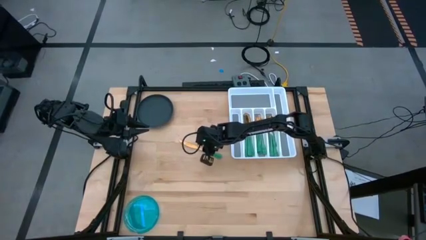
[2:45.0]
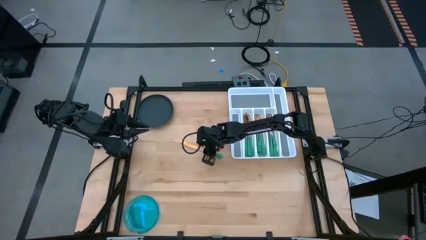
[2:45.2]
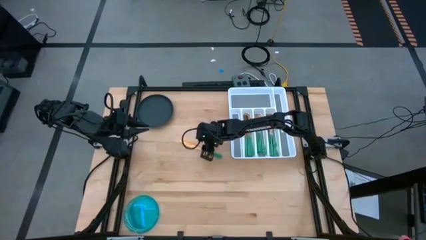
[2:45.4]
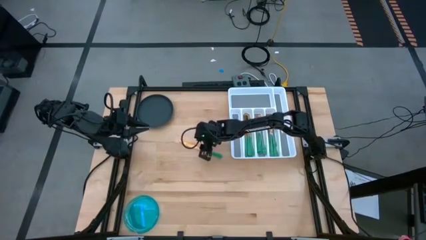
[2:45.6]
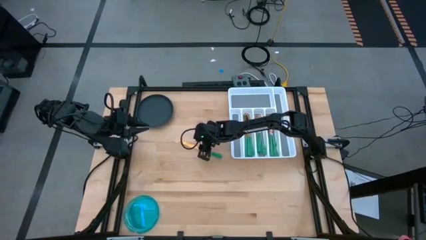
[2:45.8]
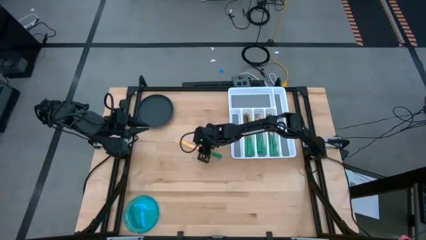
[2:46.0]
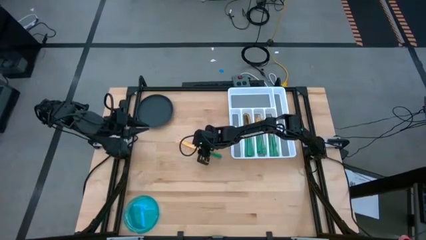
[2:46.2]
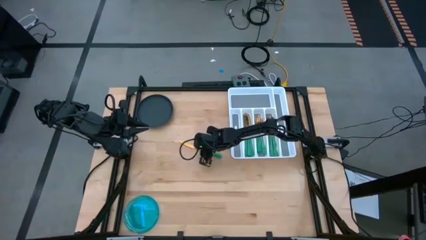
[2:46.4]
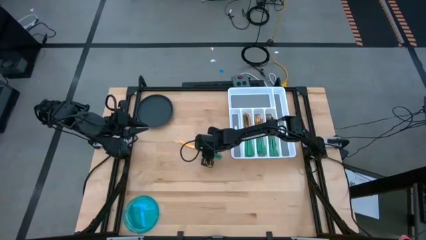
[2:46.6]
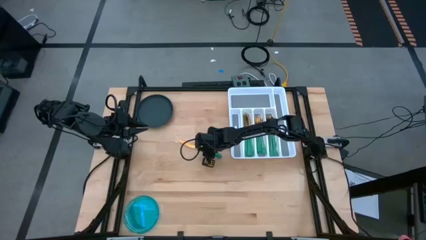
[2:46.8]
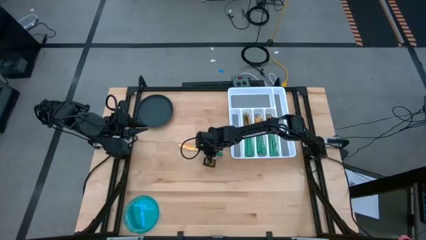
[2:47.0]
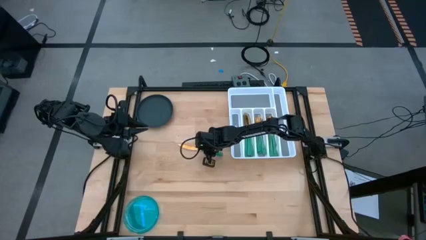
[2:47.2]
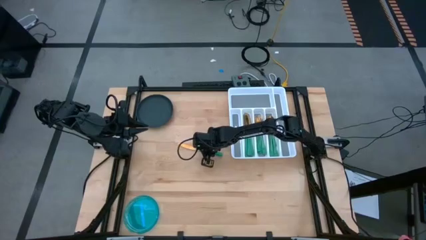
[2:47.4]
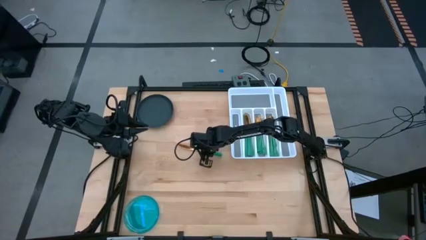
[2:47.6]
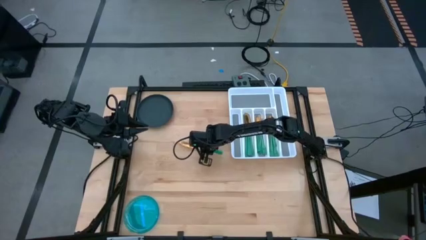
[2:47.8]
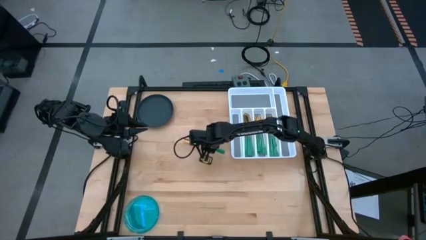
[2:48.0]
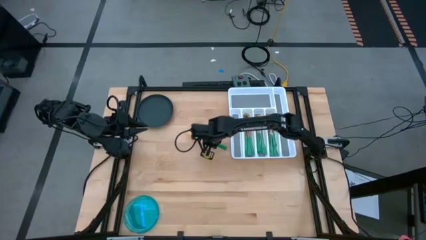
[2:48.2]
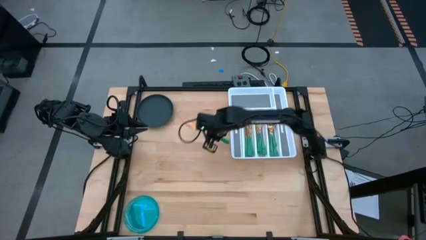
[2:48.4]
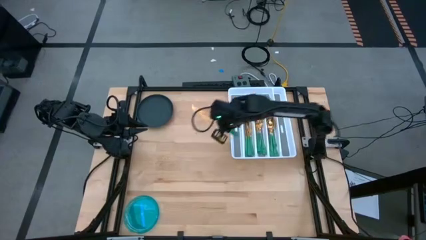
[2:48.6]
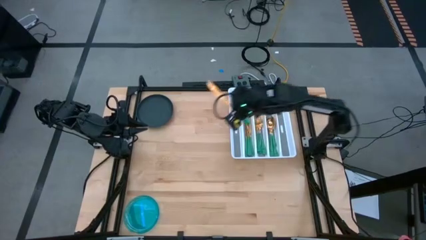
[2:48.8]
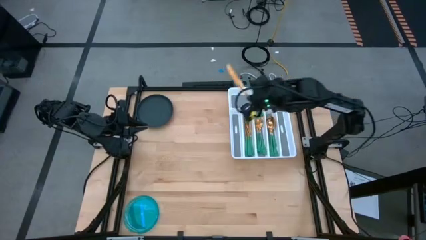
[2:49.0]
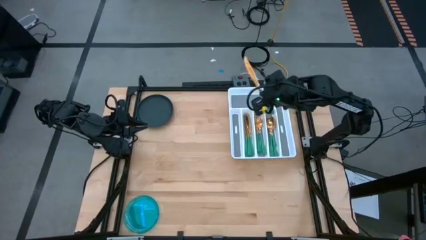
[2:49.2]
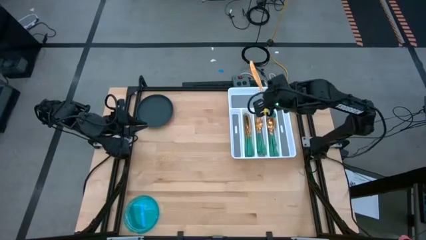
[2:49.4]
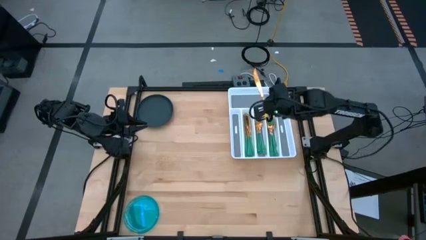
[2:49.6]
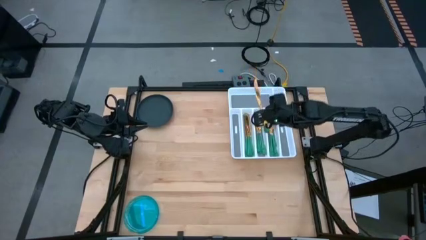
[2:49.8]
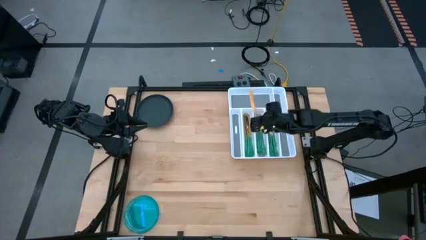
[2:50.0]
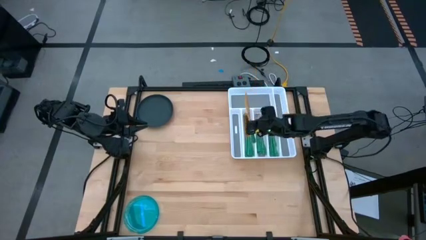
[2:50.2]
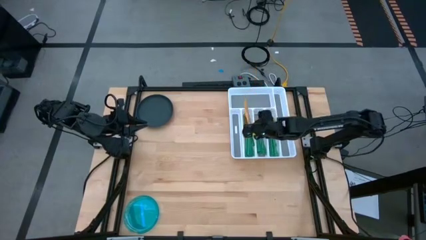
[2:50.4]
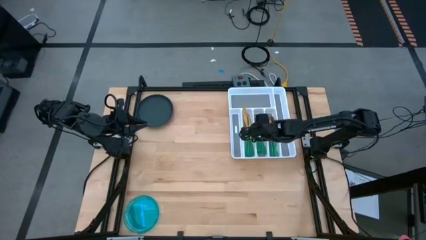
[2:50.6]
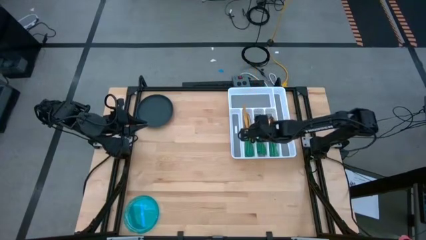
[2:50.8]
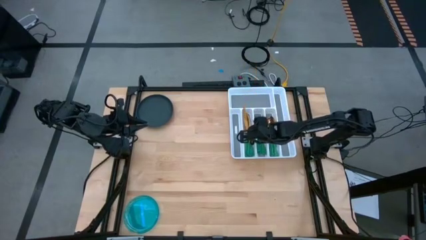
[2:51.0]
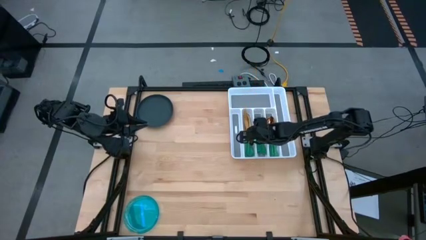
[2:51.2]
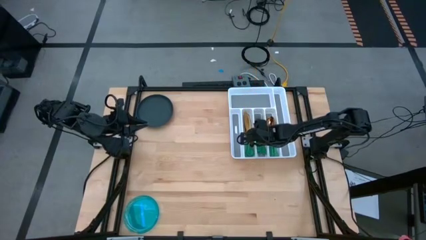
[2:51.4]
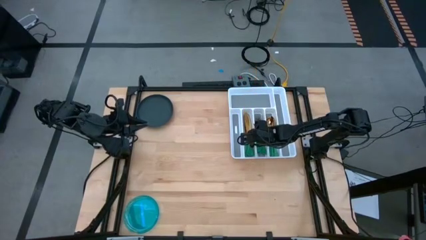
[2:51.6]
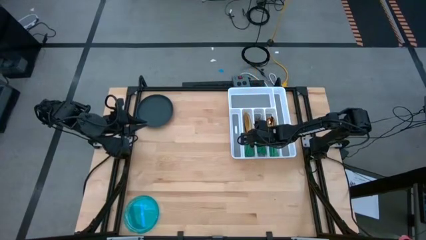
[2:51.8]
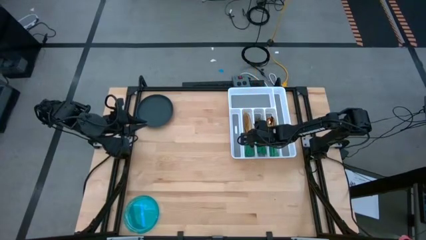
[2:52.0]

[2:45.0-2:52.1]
Task: Sort silverware
Put the green knife into the white silverware organizer

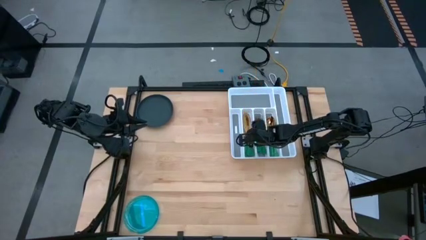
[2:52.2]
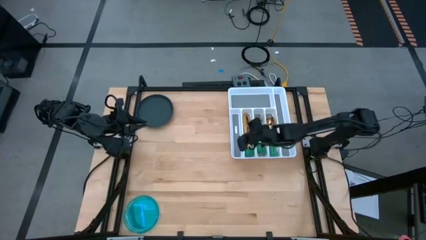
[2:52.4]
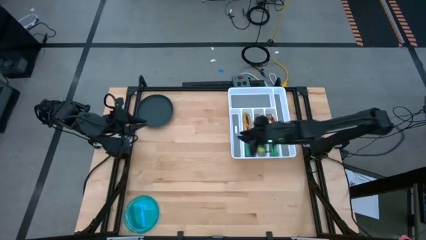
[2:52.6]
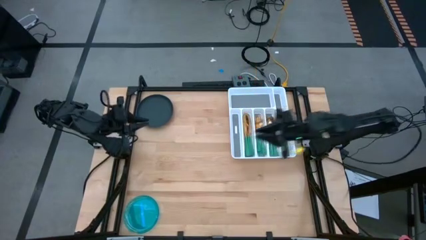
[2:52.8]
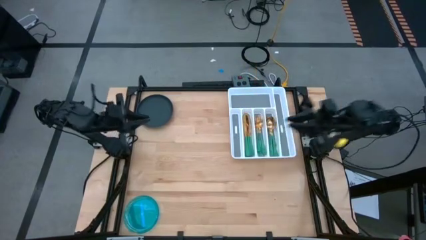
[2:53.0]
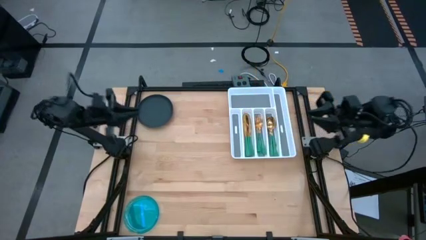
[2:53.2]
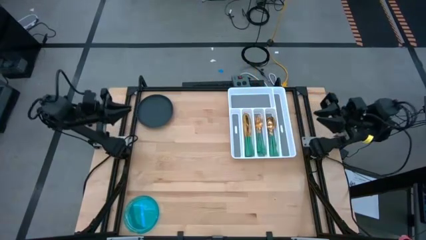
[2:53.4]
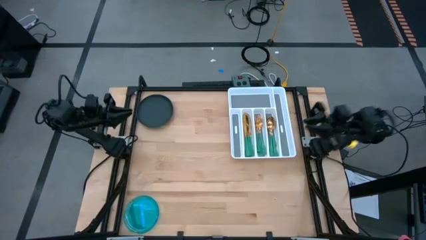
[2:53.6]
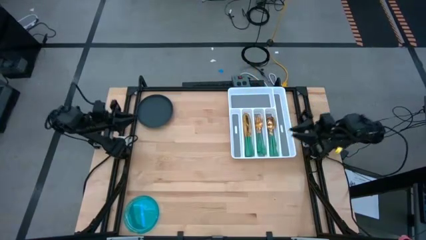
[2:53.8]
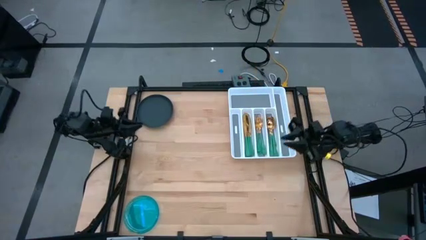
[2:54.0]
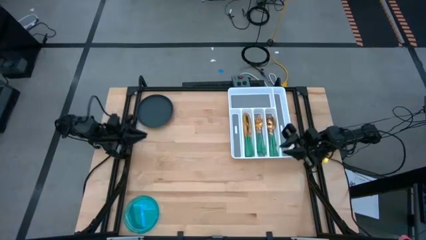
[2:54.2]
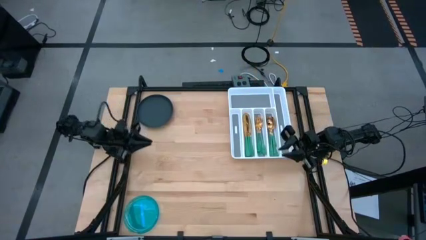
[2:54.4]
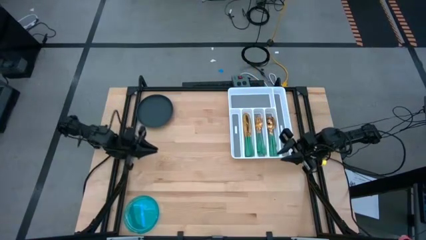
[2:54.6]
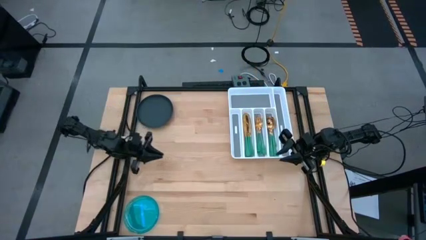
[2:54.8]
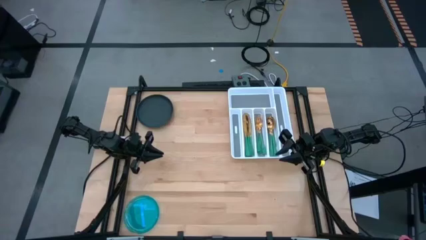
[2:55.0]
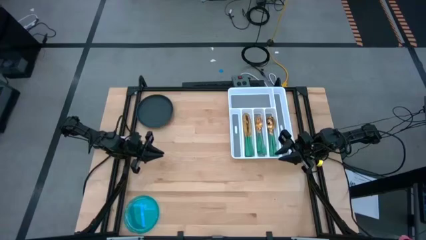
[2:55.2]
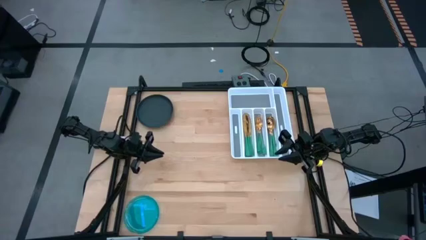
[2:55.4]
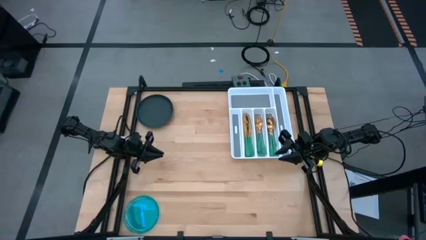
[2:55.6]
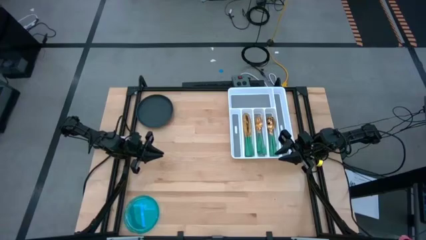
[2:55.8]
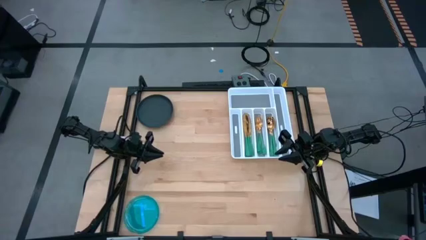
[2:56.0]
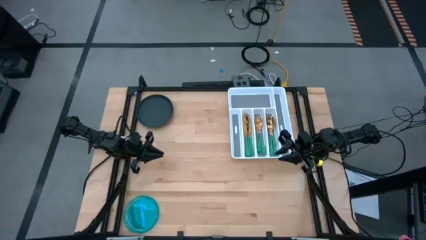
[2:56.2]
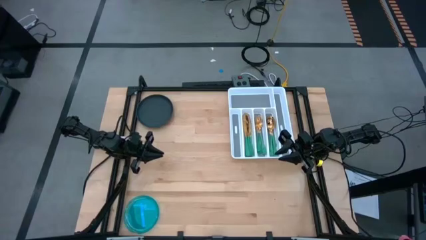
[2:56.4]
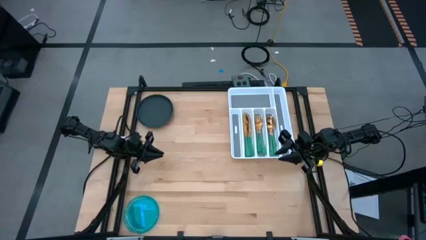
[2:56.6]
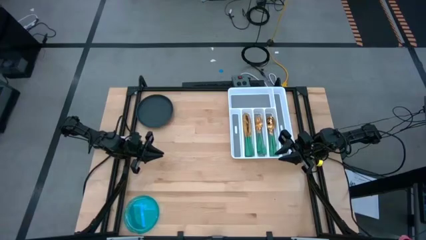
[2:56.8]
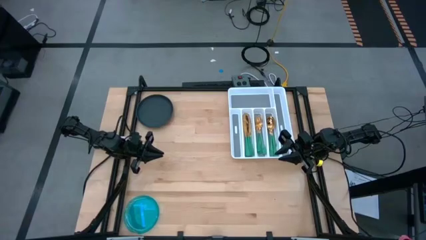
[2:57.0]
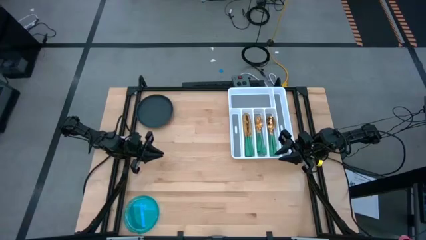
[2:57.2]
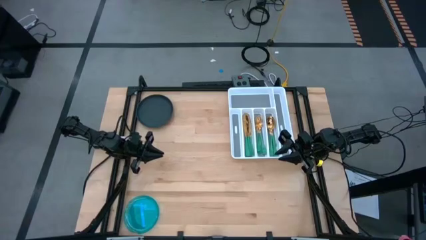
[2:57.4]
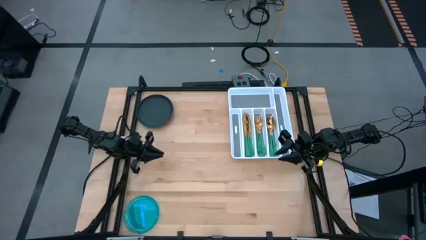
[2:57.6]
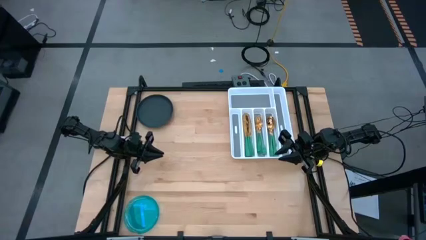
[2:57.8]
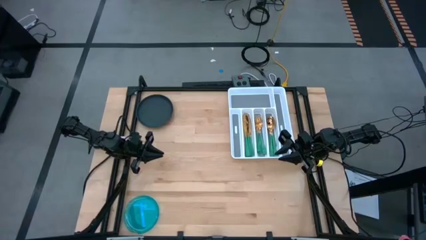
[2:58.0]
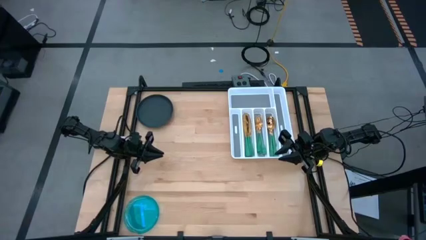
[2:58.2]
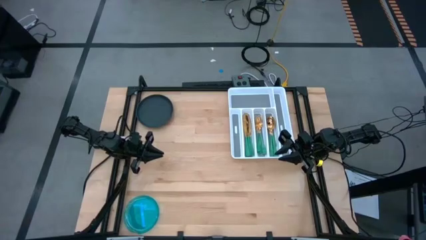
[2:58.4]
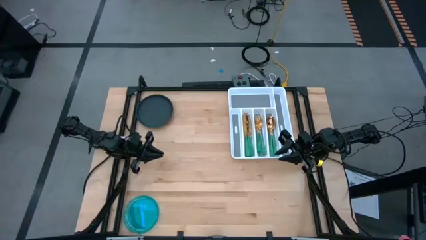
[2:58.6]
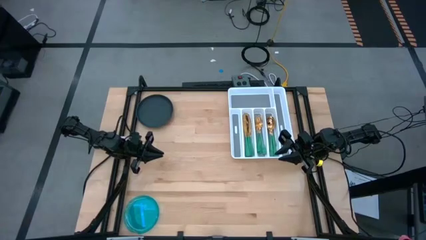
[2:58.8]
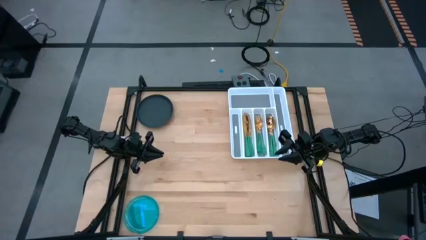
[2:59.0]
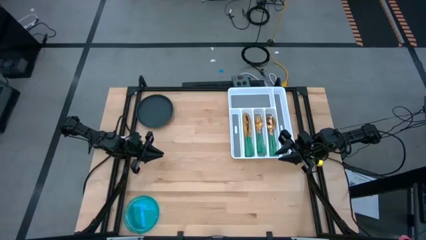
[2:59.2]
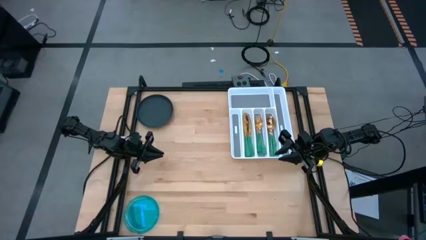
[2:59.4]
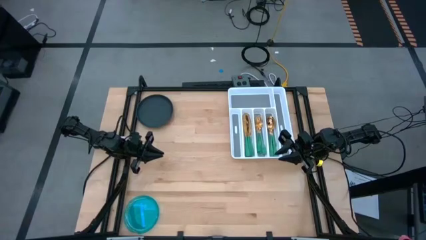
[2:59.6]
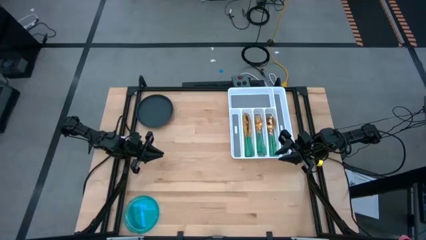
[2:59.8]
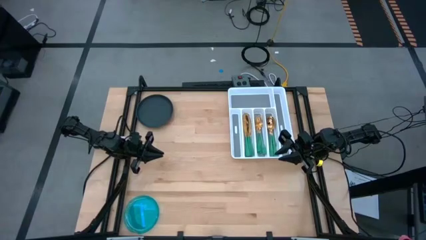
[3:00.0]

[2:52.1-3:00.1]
Return to Home Position

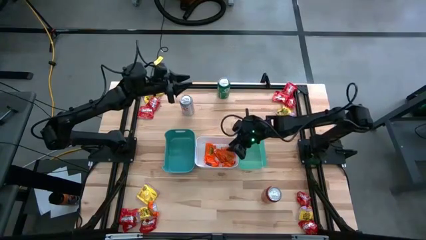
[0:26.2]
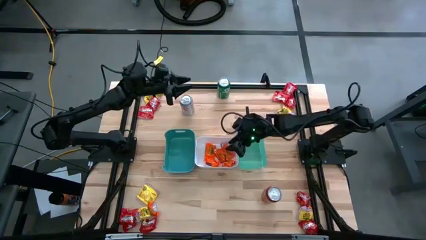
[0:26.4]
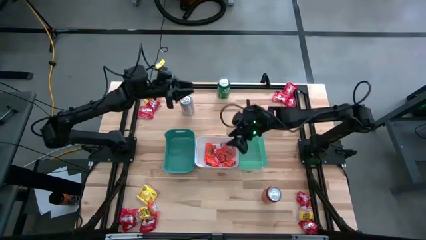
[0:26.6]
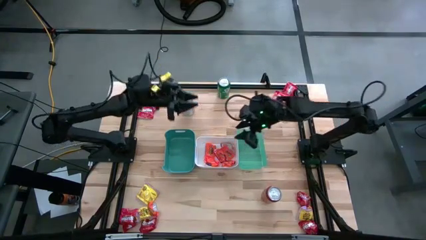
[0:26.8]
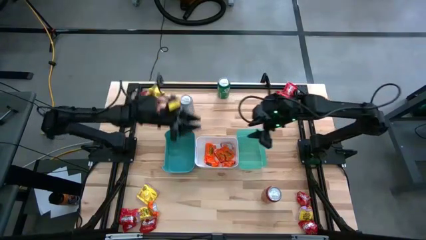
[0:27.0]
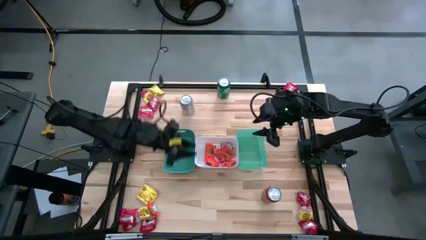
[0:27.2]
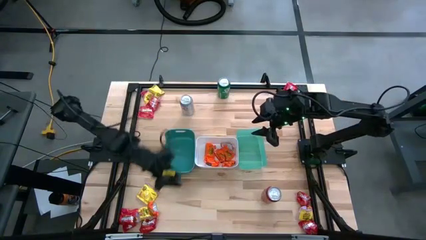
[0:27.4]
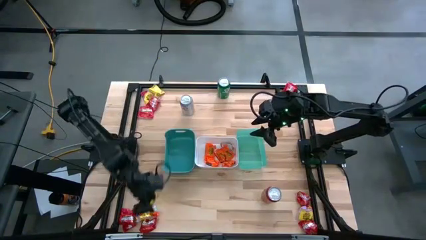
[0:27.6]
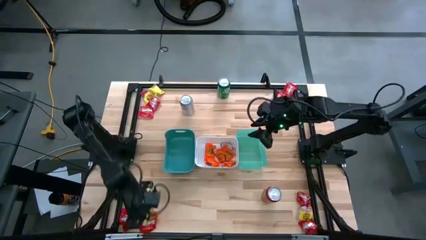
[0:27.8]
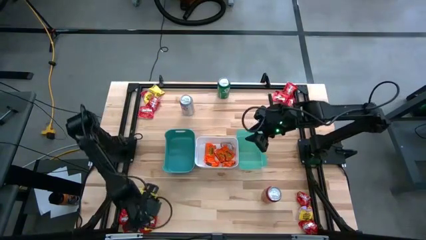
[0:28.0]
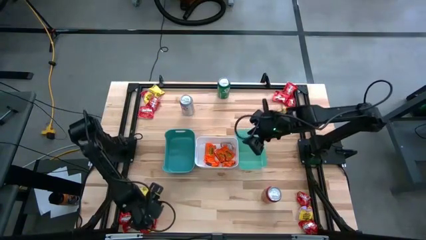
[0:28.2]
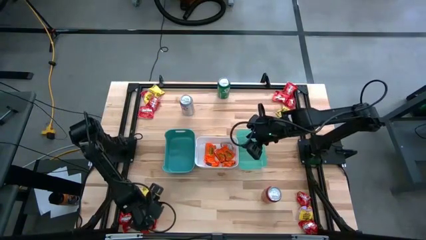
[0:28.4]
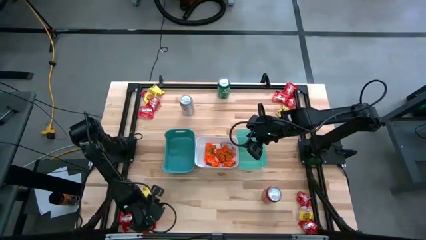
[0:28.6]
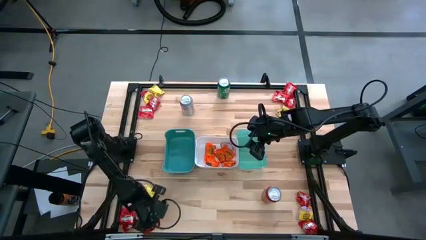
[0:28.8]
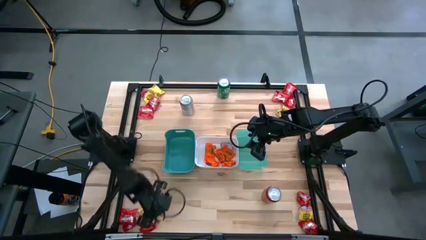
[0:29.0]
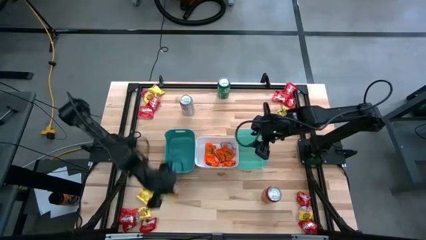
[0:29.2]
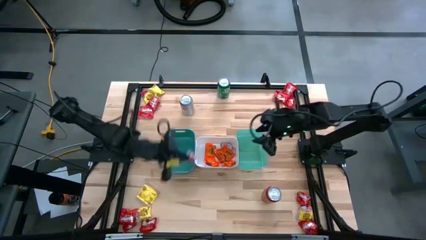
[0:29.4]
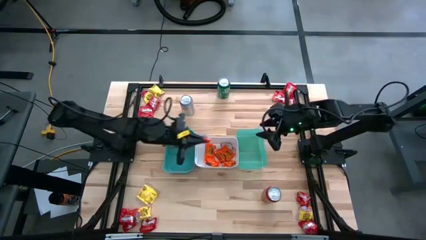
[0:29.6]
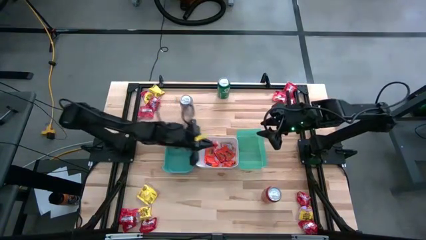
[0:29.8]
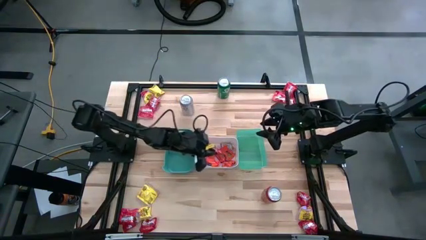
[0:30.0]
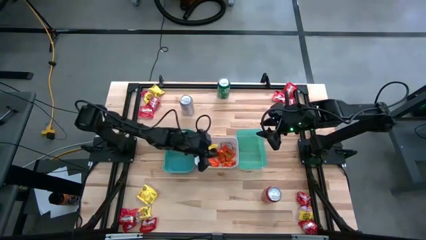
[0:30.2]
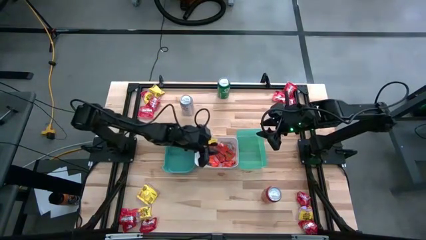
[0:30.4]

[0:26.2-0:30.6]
Task: Sort candy
Put the orange chocolate into the white bin
